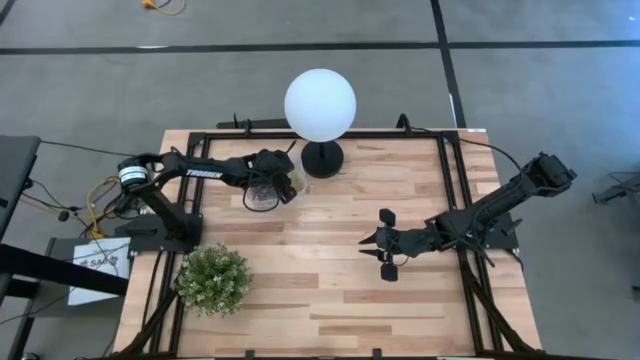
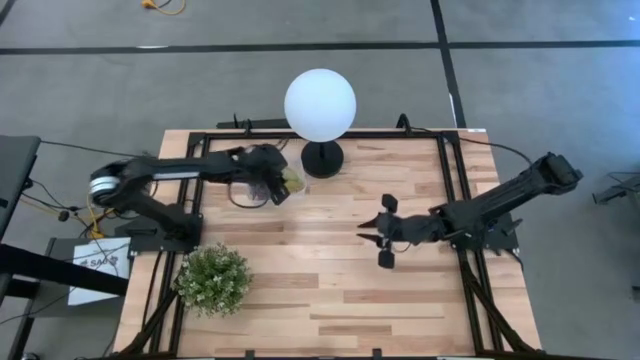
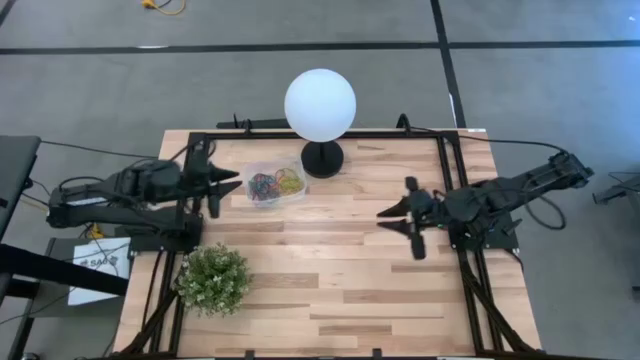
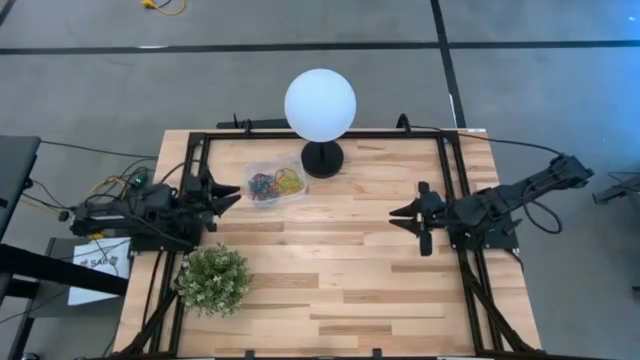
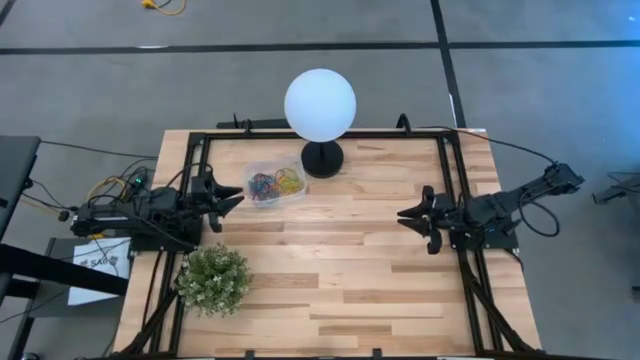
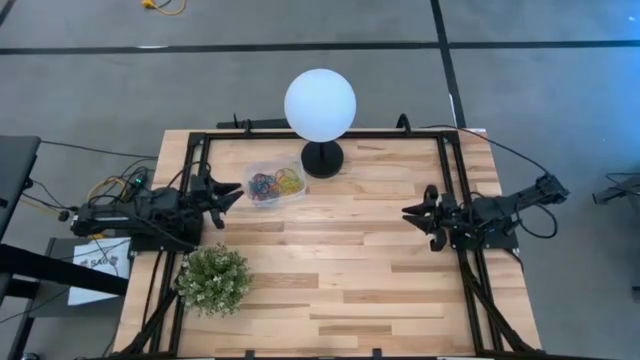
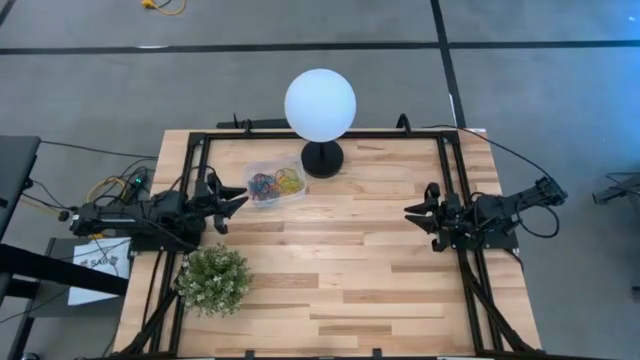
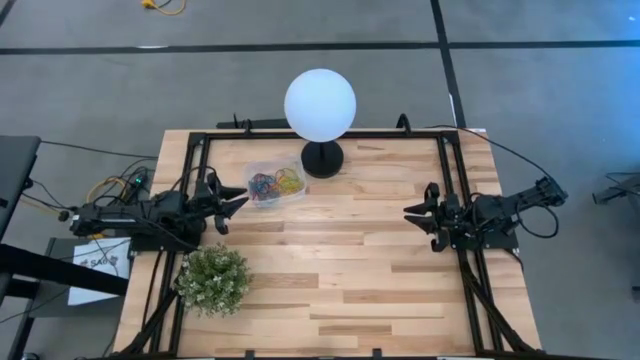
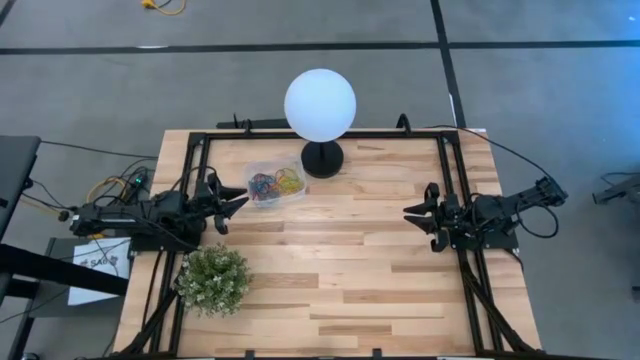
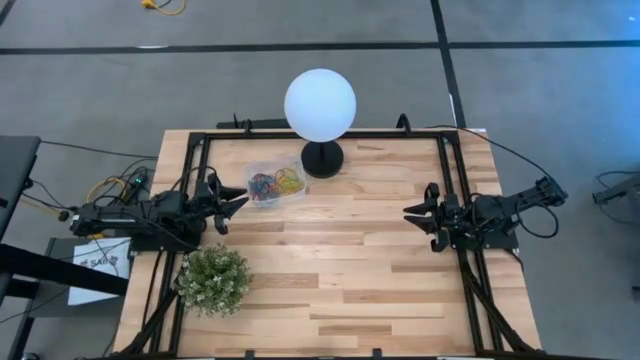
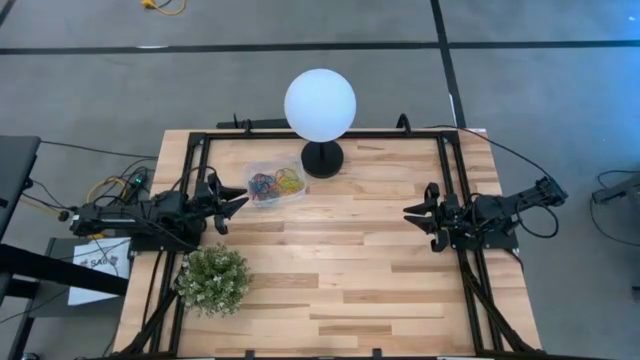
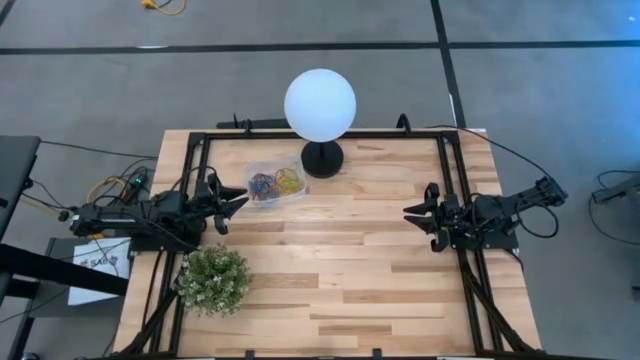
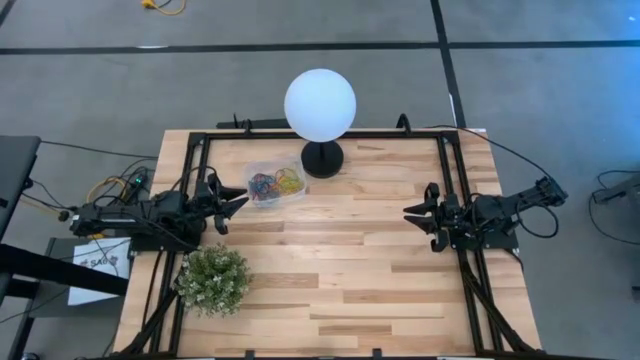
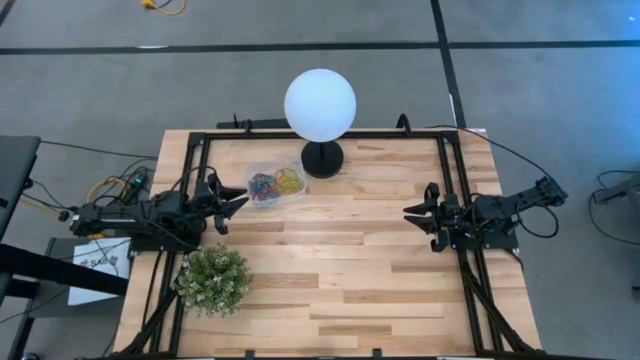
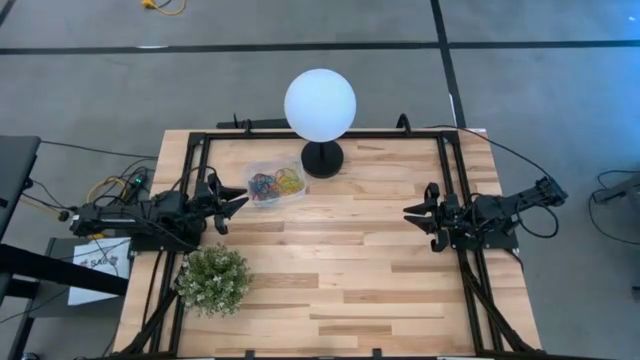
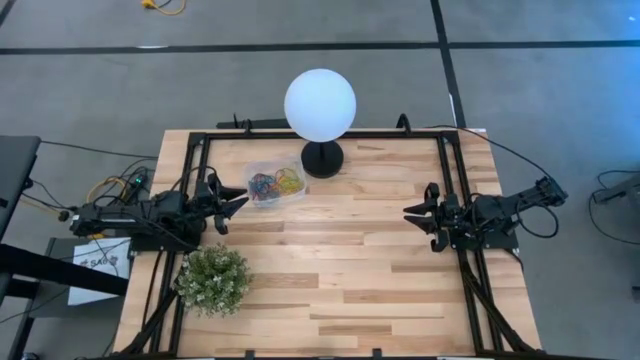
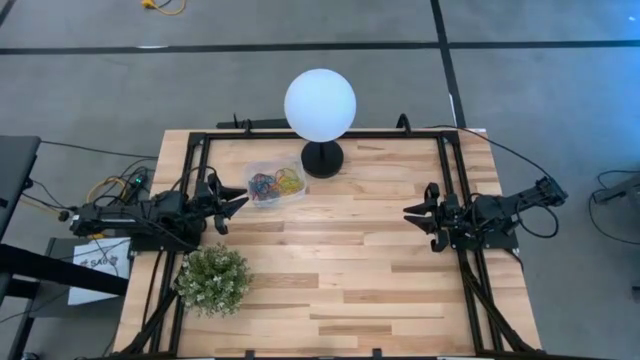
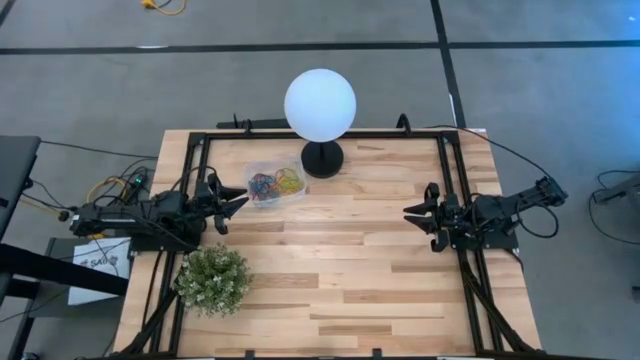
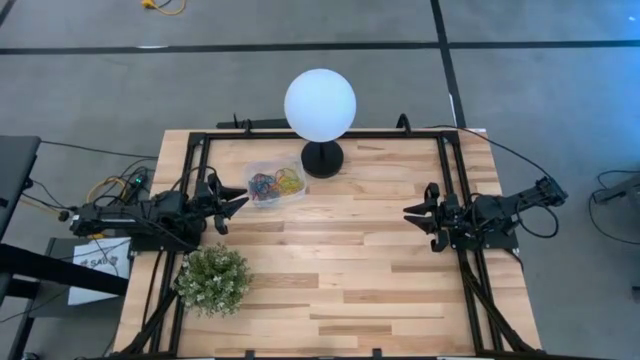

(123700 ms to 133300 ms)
Task: Pick and place items into bin
Return to Home Position

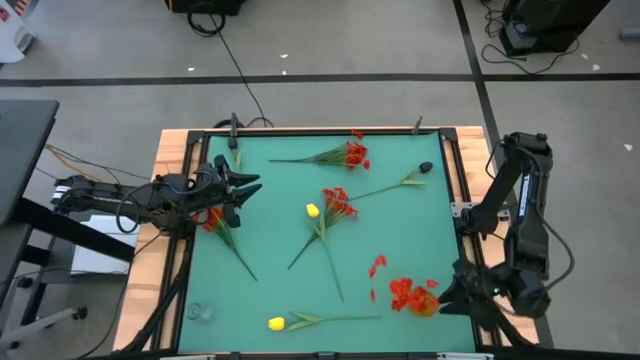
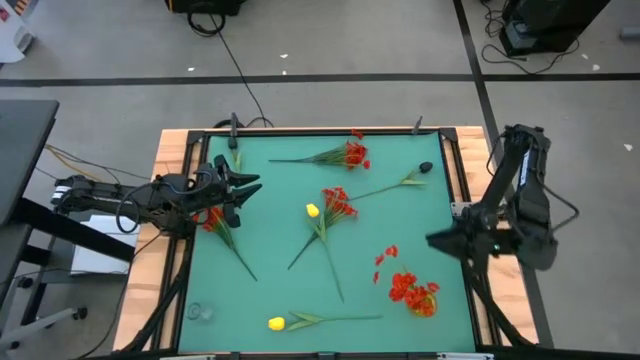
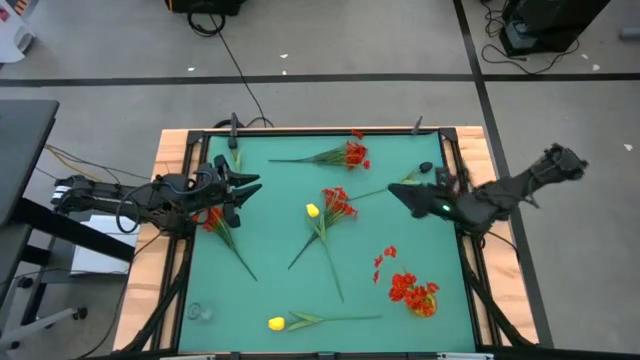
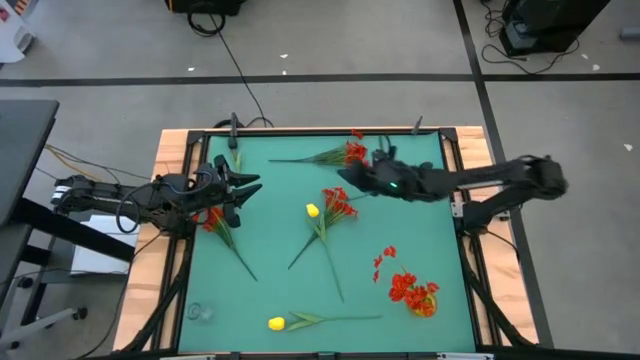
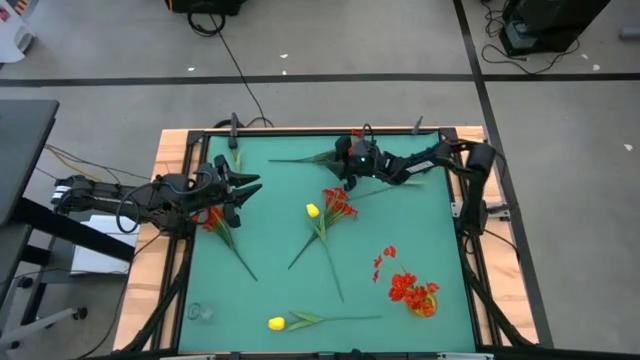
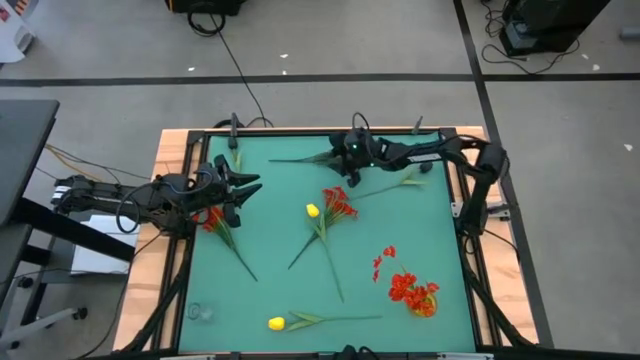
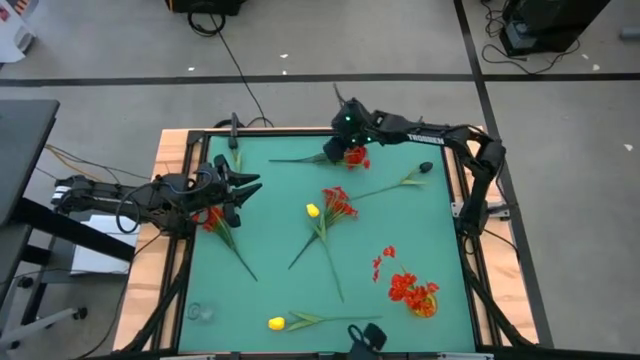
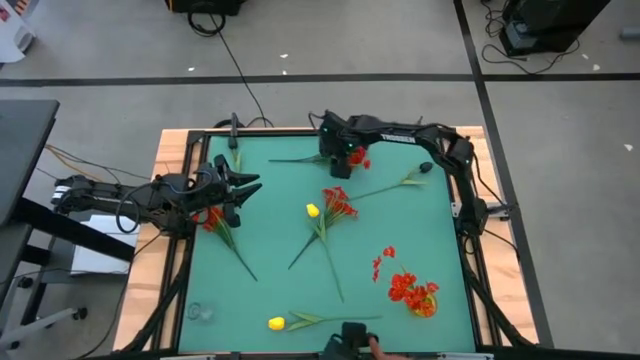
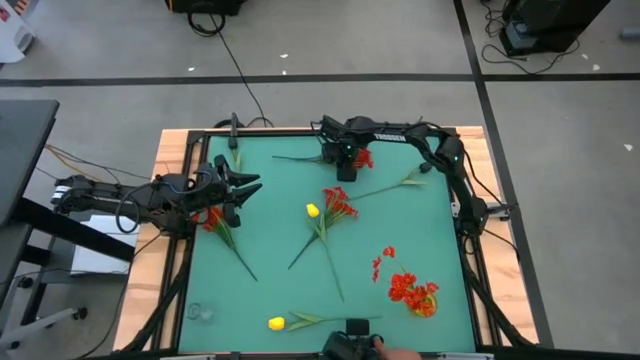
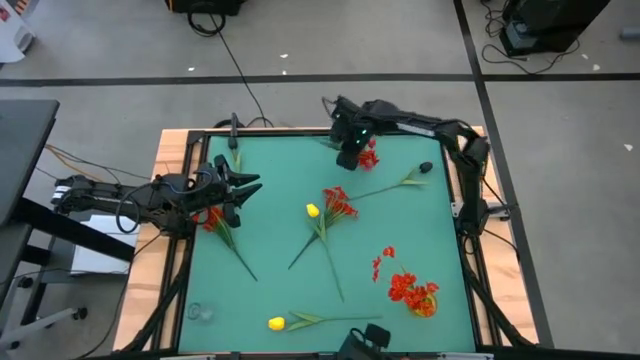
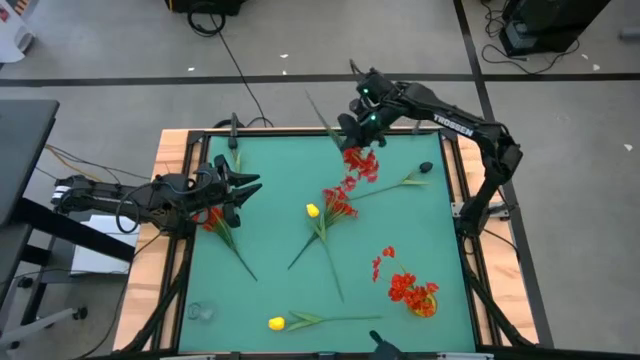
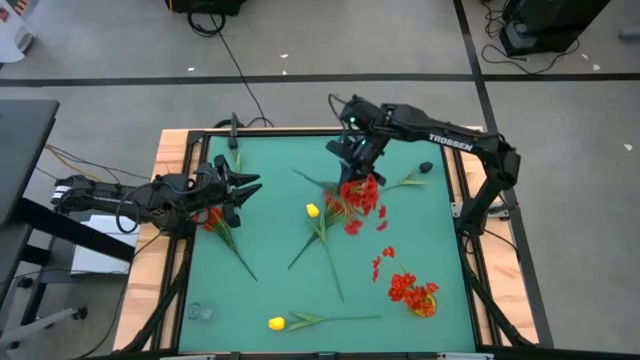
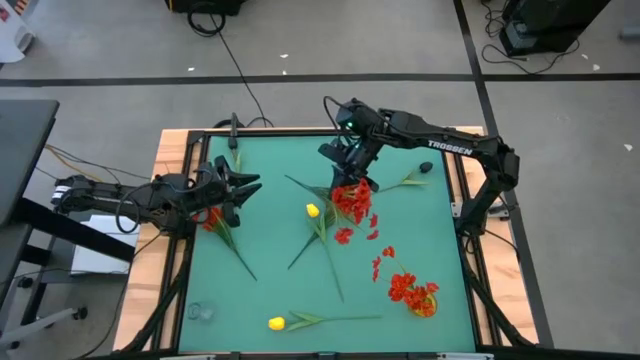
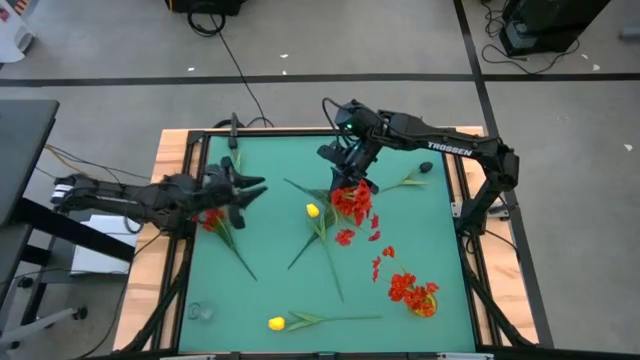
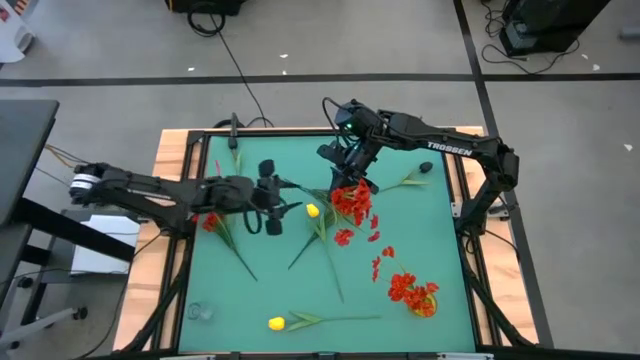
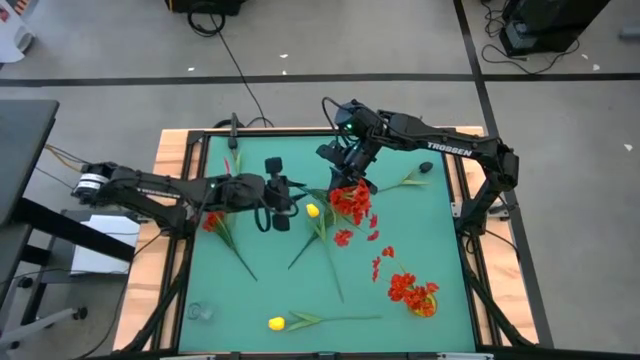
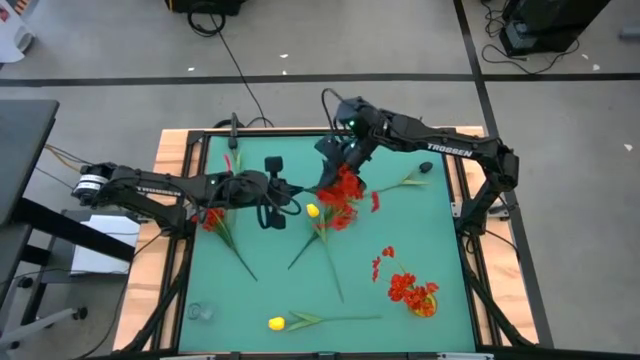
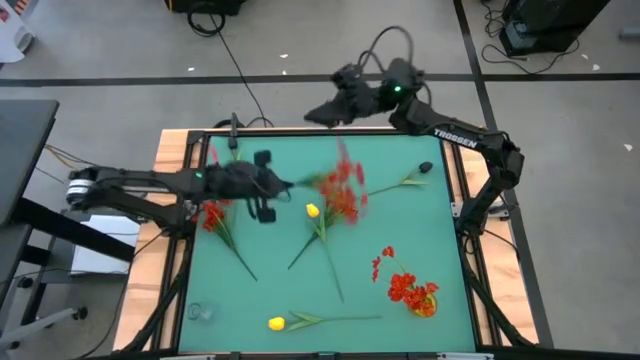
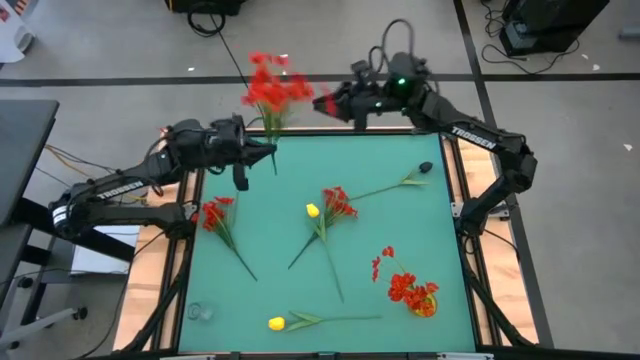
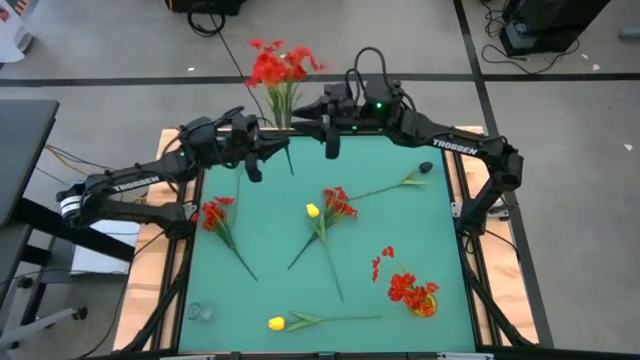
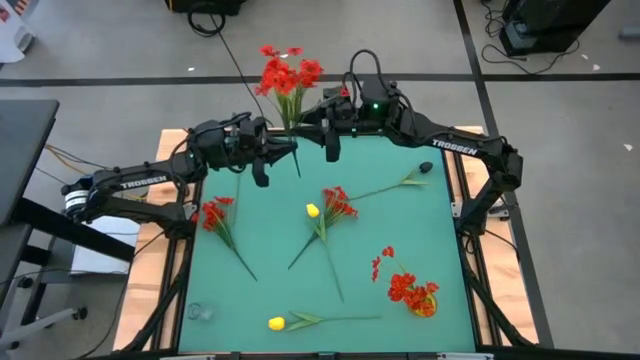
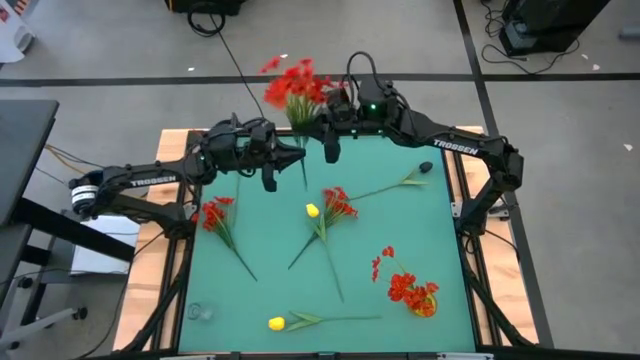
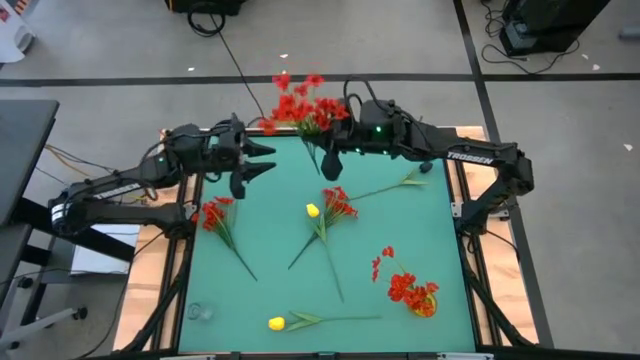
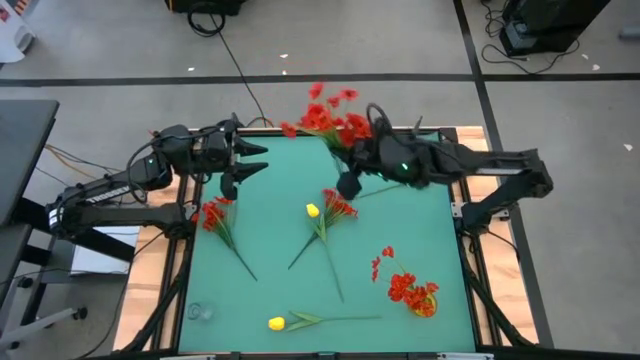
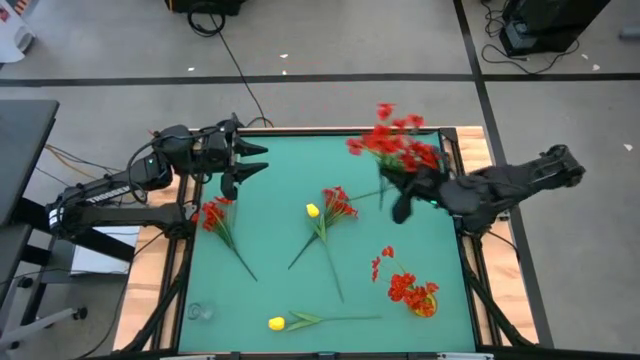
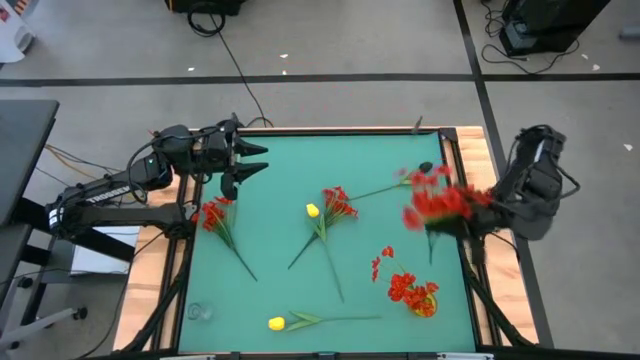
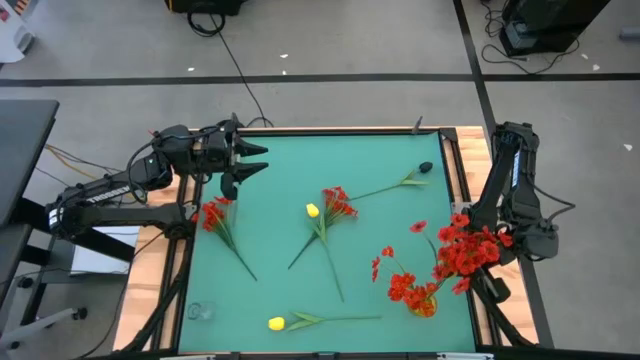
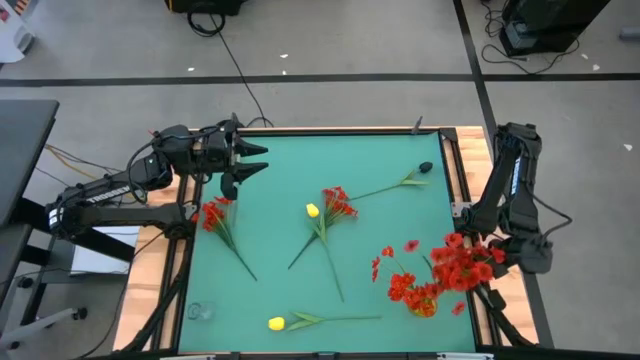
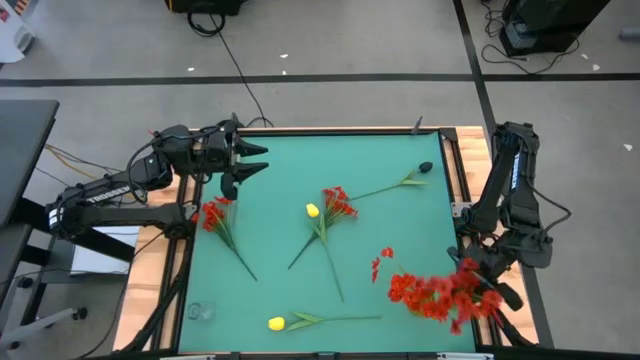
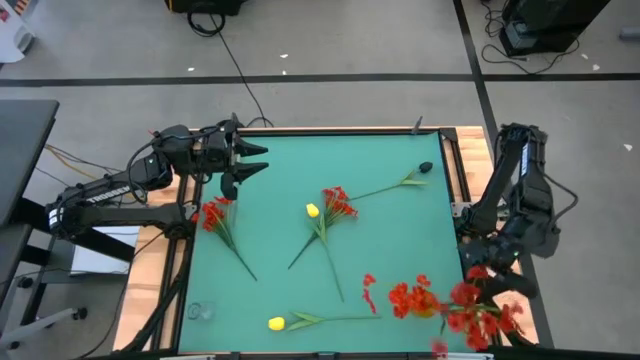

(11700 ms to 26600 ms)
Task: Sort flowers into vase by color
Put the top red flowers into the yellow flower vase
